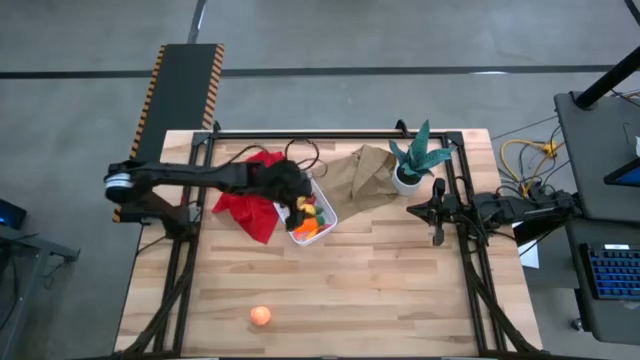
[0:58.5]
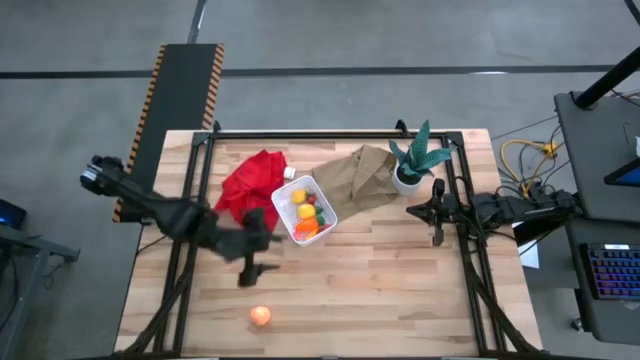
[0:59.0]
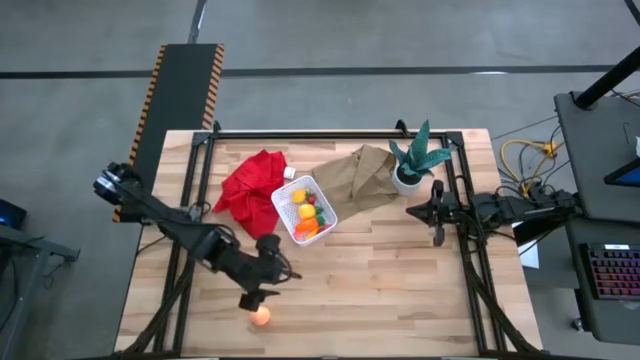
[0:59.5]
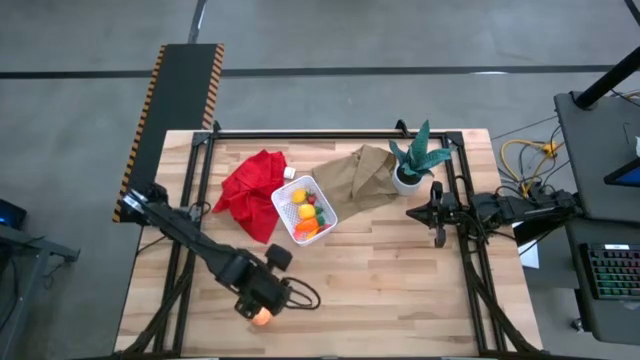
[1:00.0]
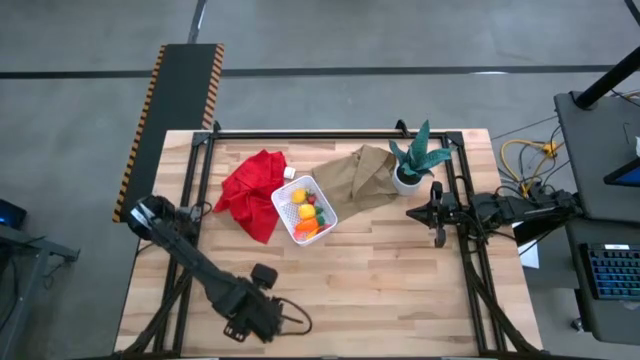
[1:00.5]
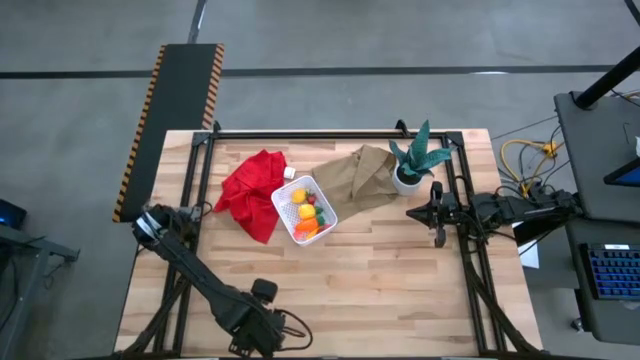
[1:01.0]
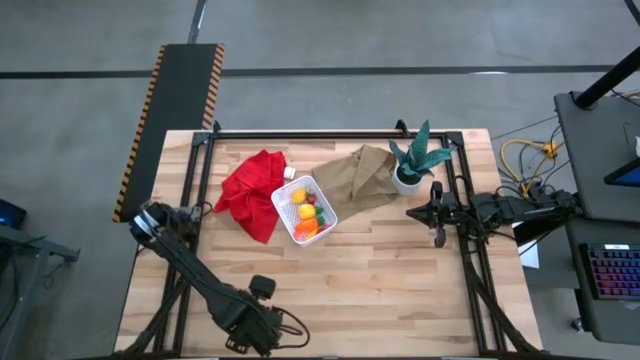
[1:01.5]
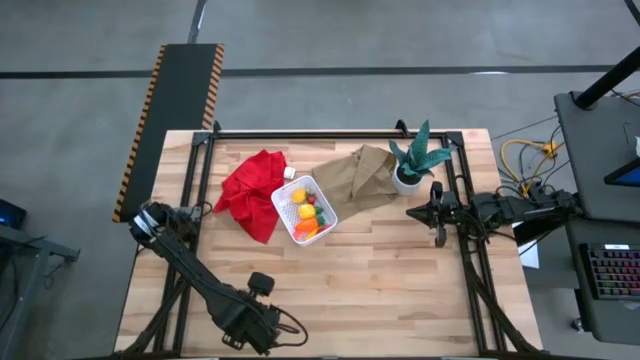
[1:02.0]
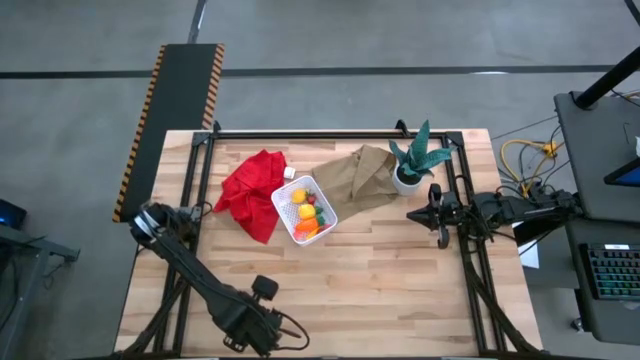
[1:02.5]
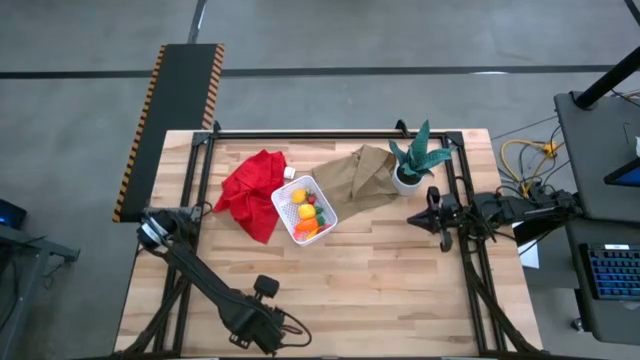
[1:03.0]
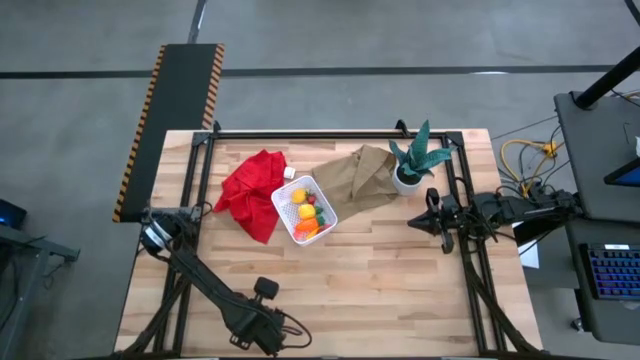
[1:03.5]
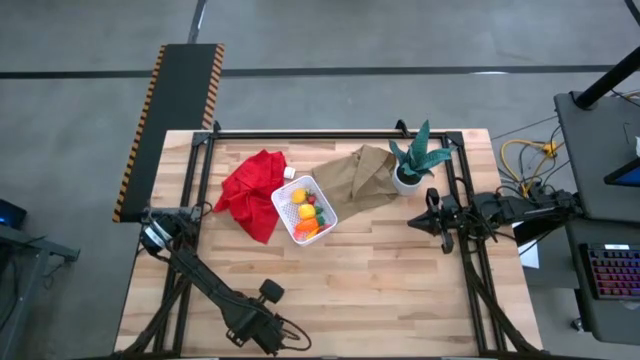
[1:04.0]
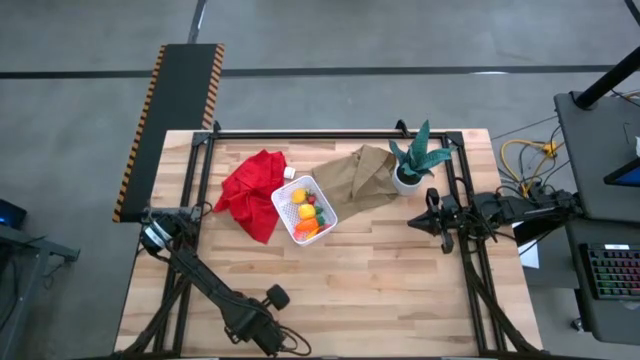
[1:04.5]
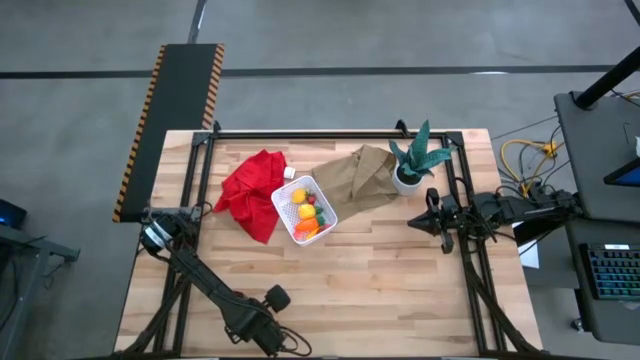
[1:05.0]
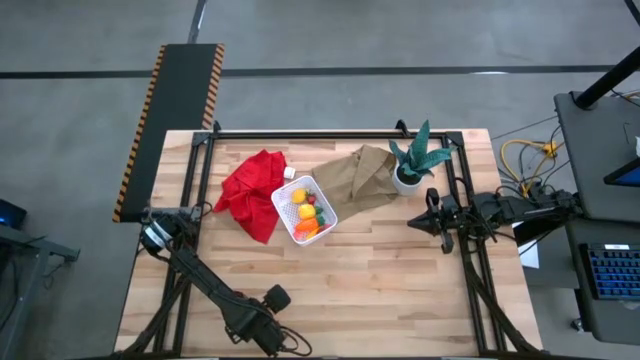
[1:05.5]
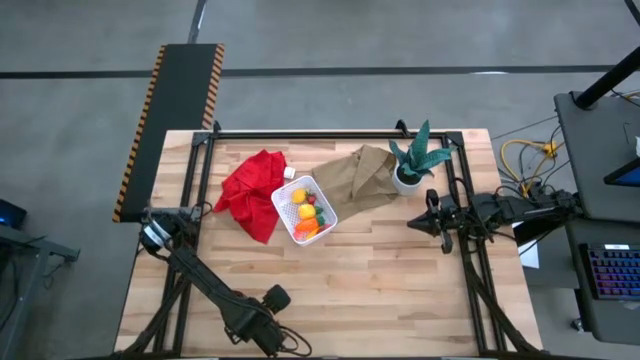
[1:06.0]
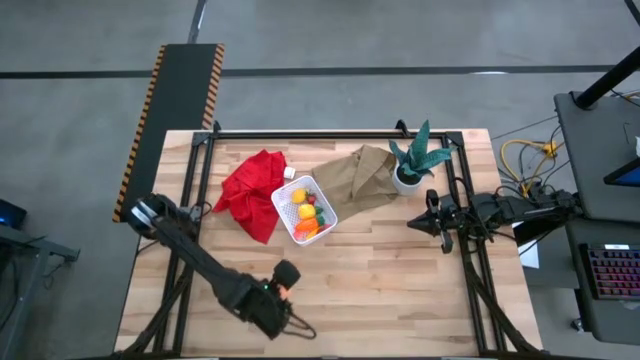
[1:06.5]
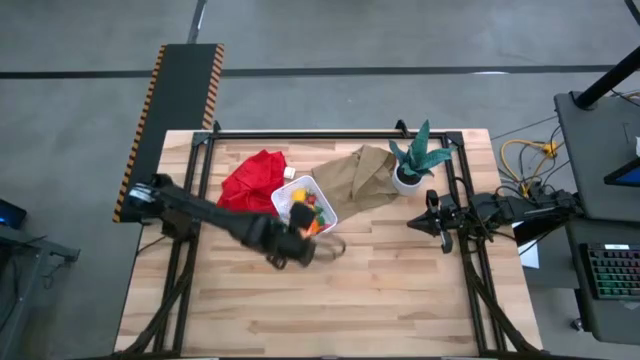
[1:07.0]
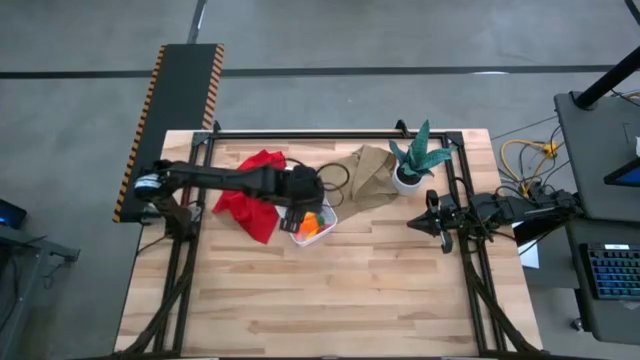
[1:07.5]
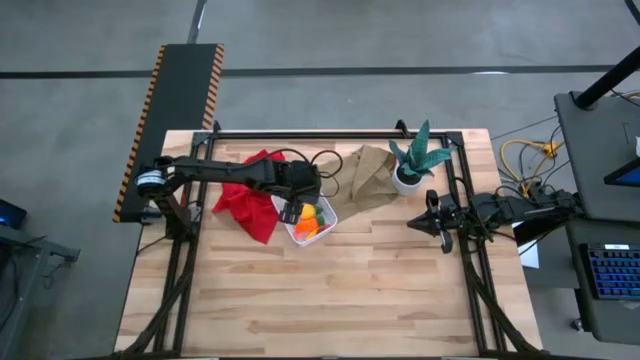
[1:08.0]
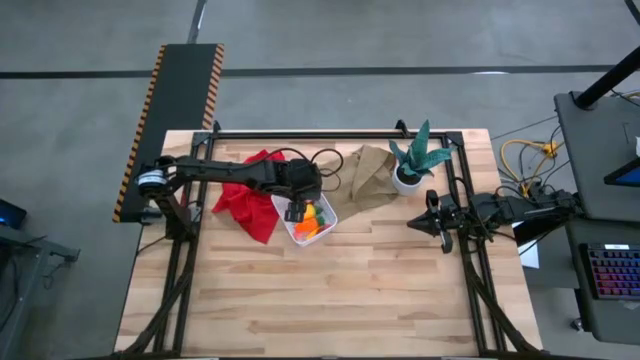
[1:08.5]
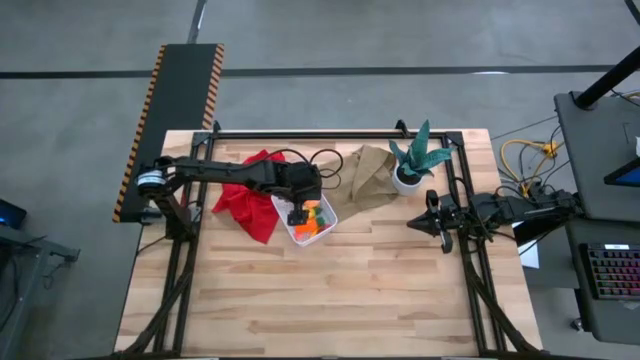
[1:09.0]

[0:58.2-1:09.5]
Task: Pick and placing Produce into tupperware
Put the toy peach into the white bin

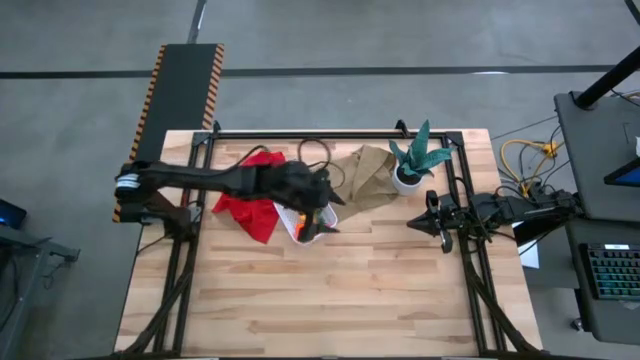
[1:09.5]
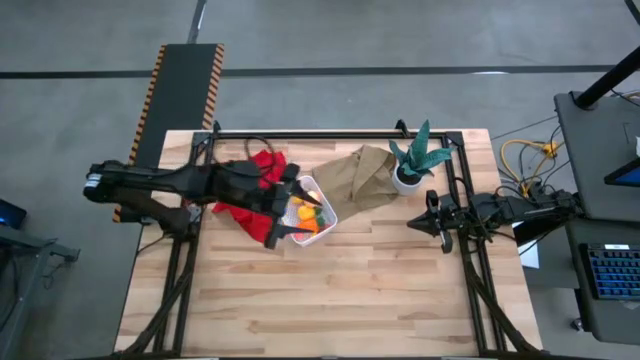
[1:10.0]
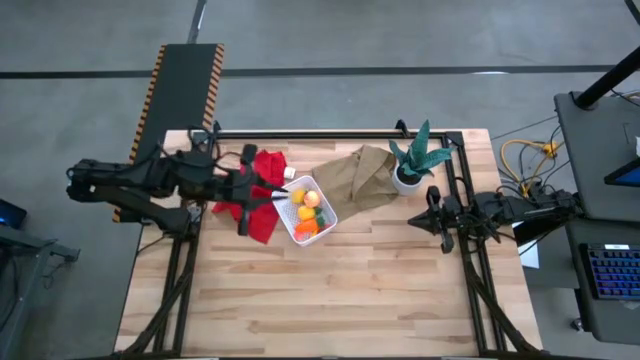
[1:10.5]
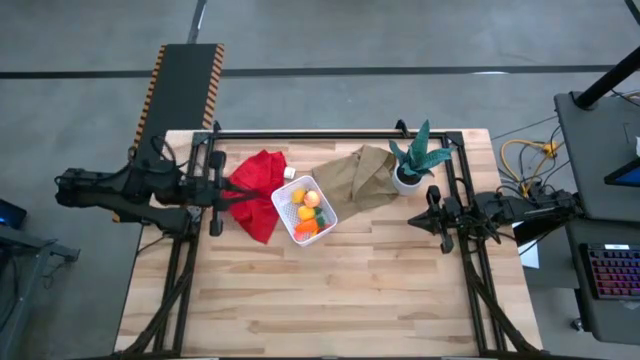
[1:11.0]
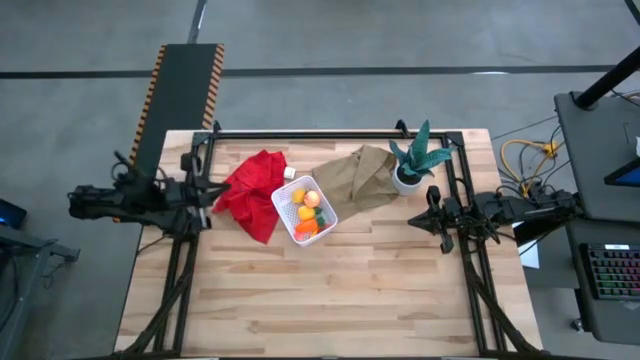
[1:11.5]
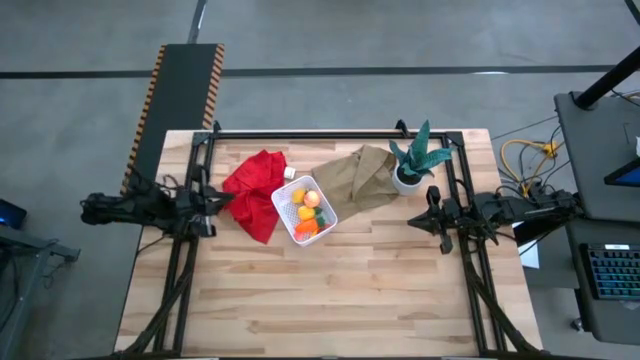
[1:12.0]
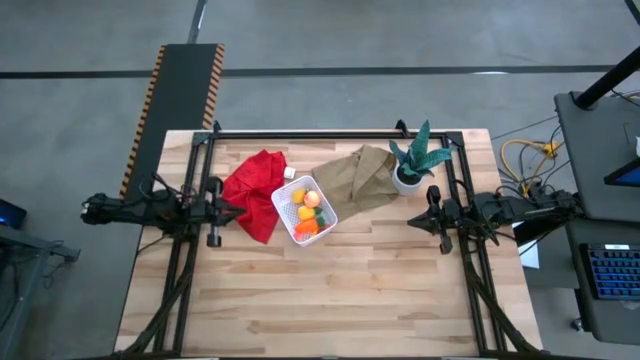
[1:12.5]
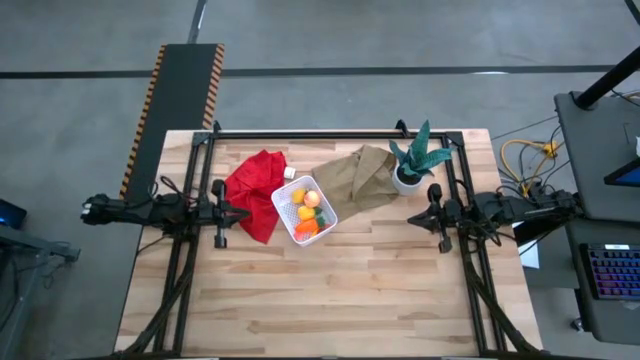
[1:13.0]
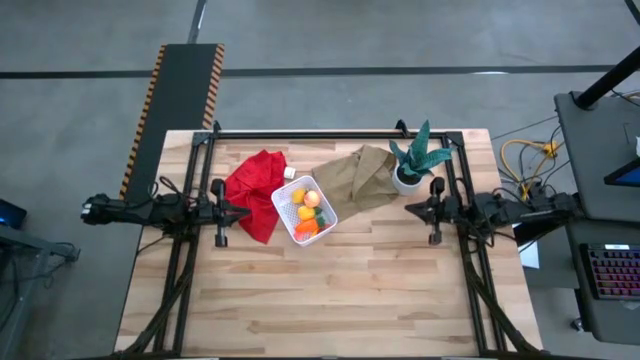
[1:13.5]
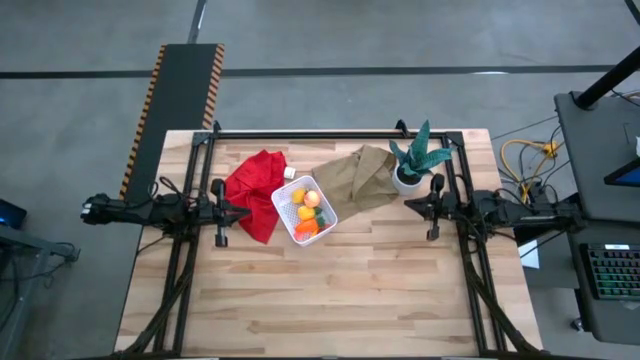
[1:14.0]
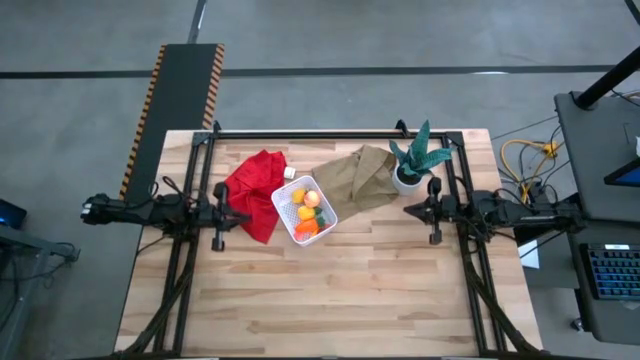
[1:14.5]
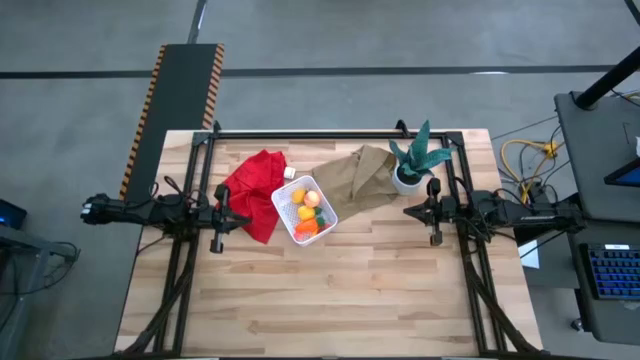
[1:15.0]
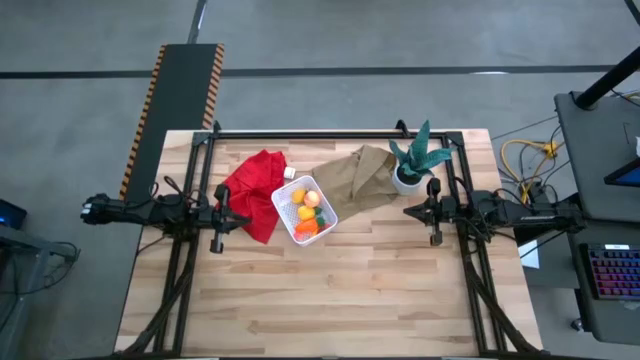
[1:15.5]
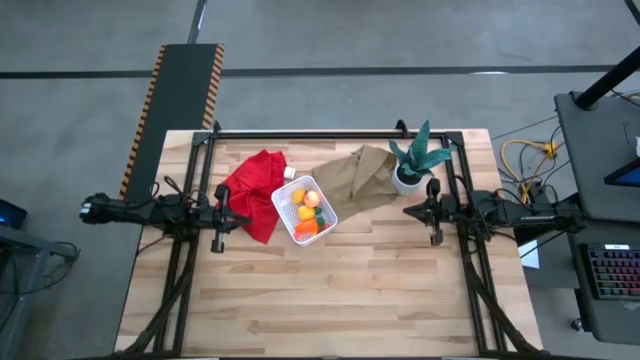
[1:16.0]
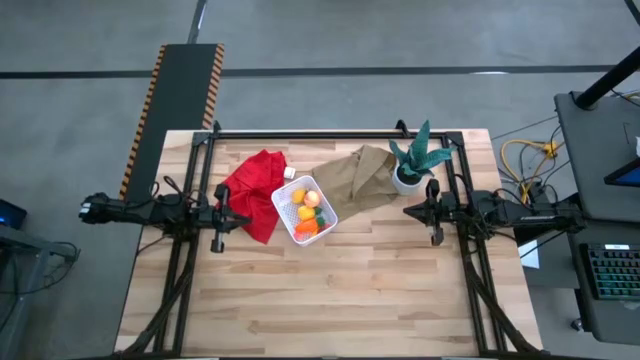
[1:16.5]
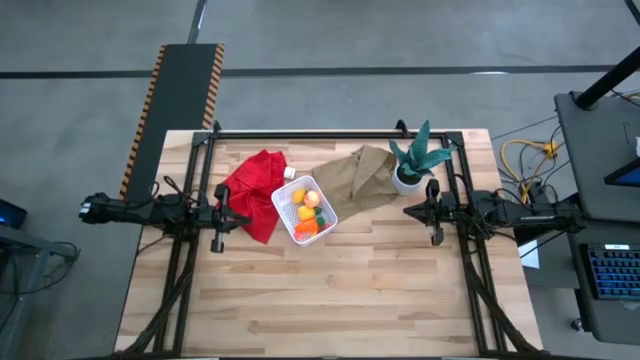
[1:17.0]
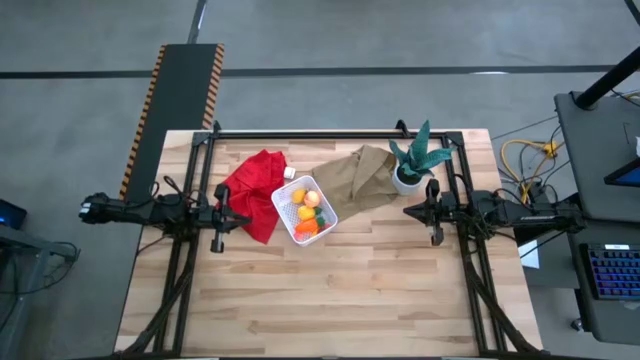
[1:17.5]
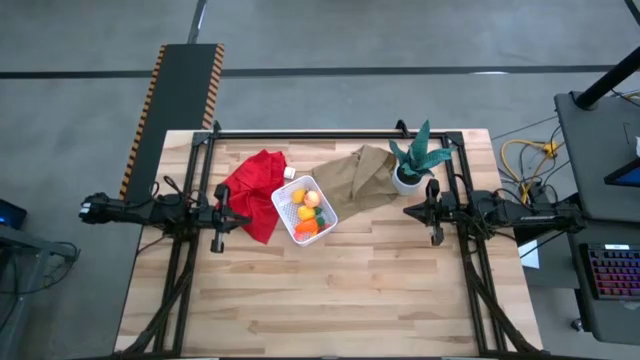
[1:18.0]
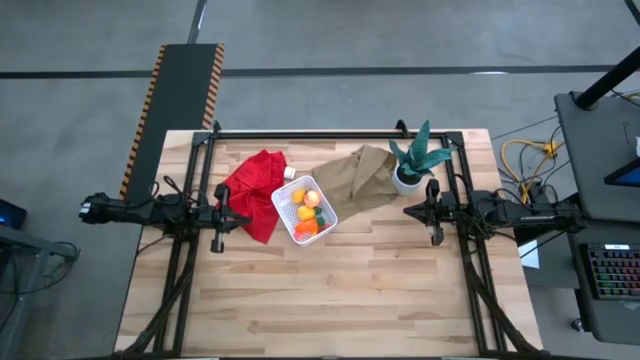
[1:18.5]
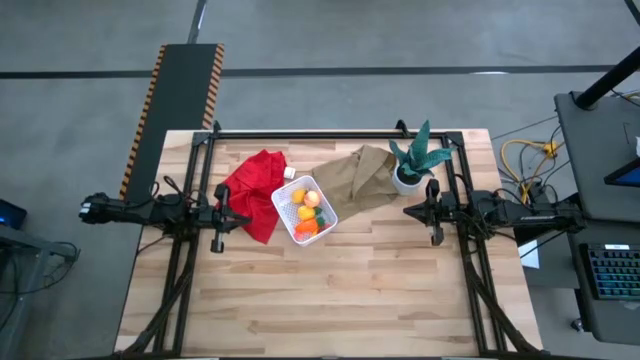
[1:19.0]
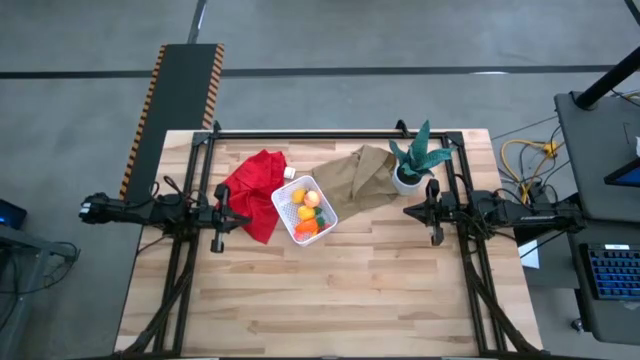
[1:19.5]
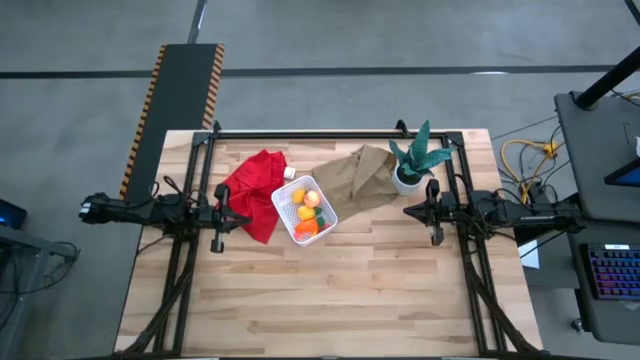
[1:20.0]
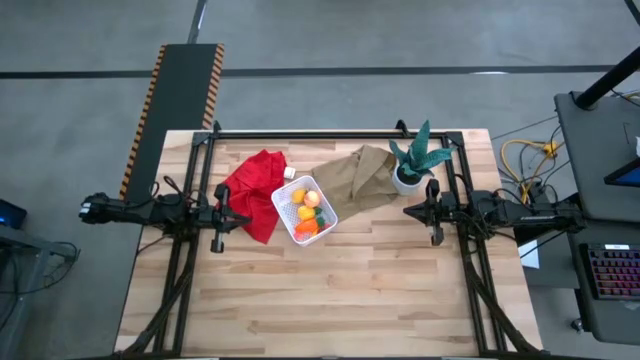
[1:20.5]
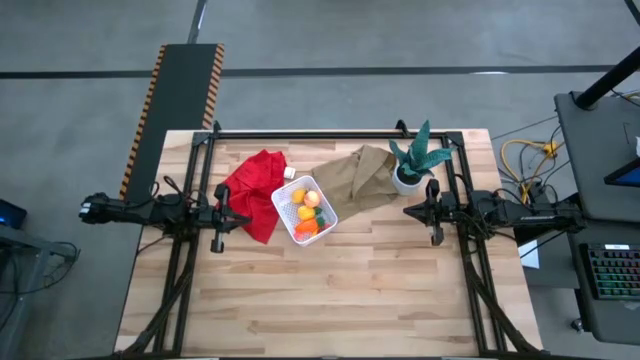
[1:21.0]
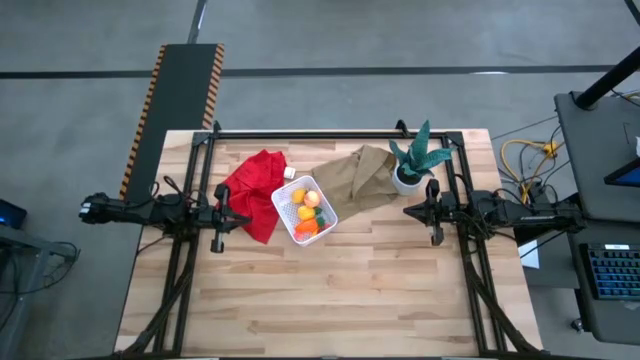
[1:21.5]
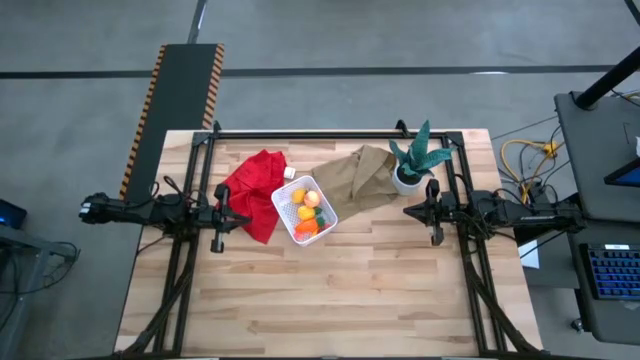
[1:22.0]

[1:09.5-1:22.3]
Return to Home Position
